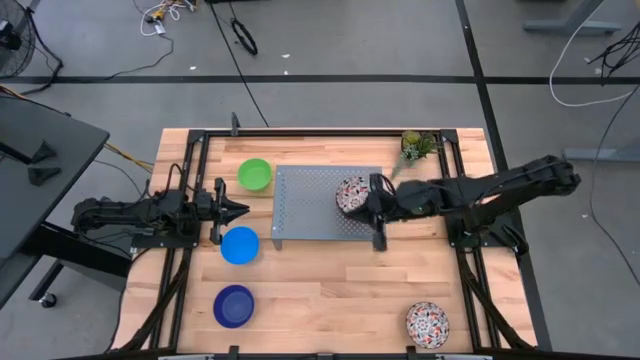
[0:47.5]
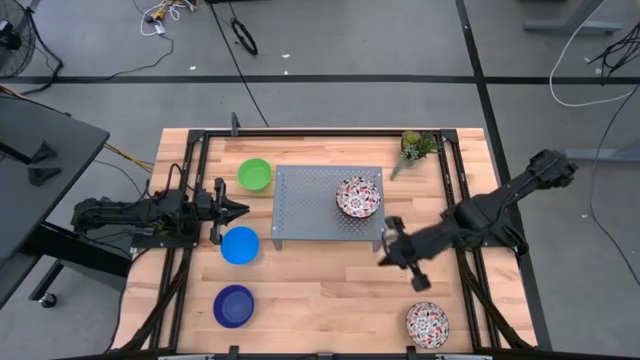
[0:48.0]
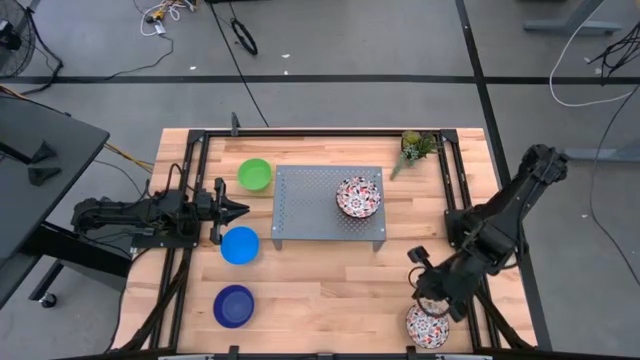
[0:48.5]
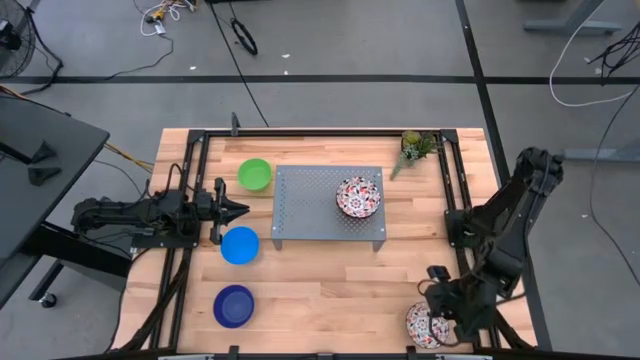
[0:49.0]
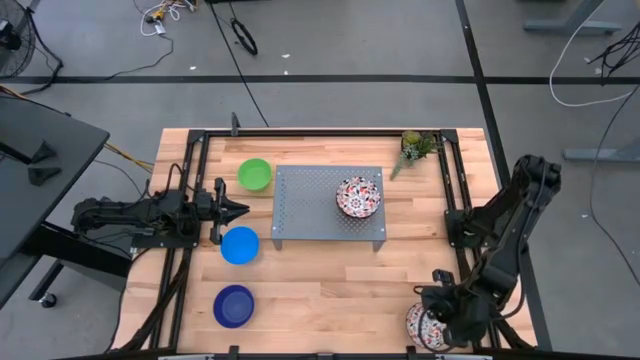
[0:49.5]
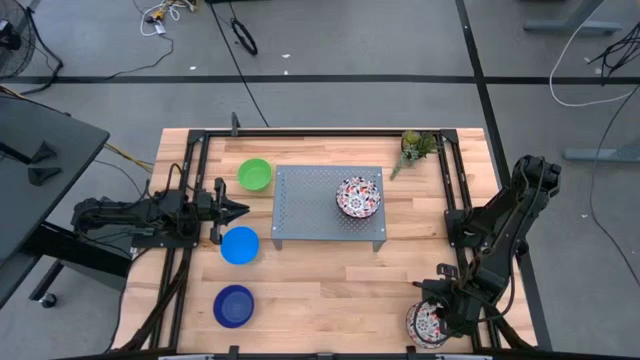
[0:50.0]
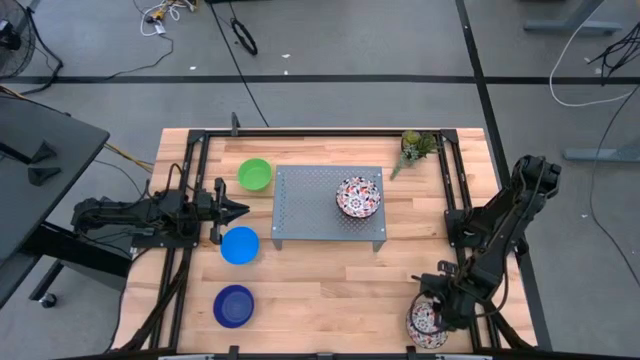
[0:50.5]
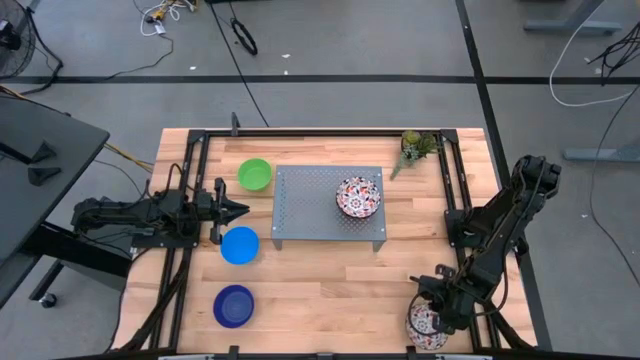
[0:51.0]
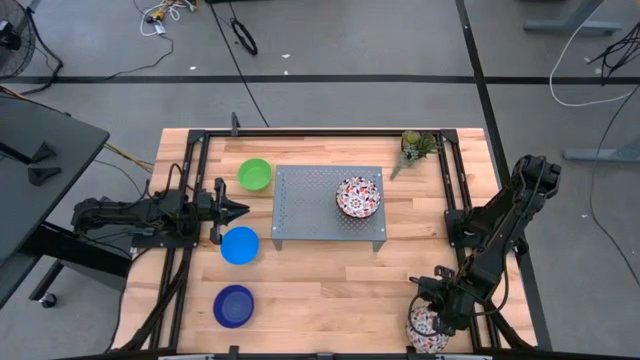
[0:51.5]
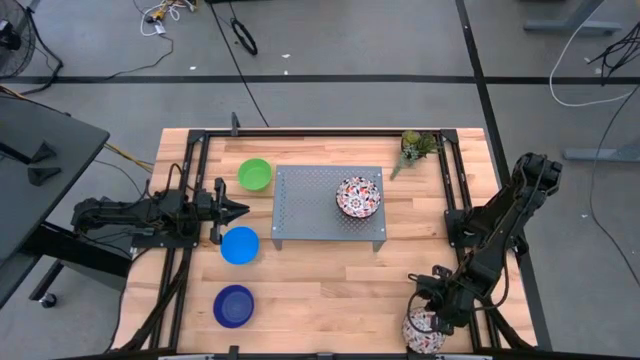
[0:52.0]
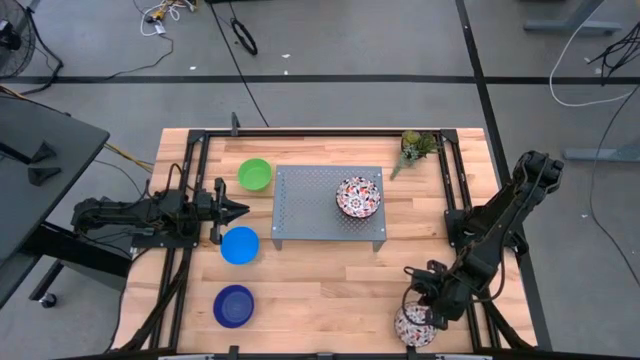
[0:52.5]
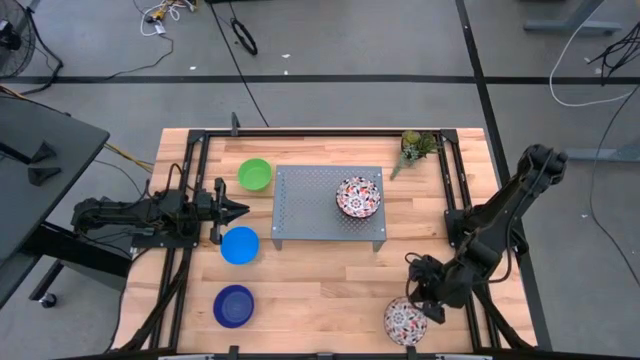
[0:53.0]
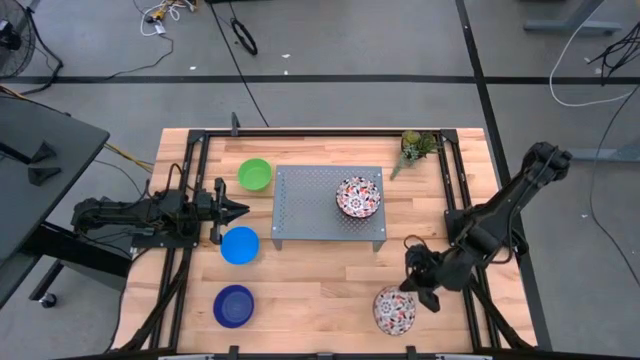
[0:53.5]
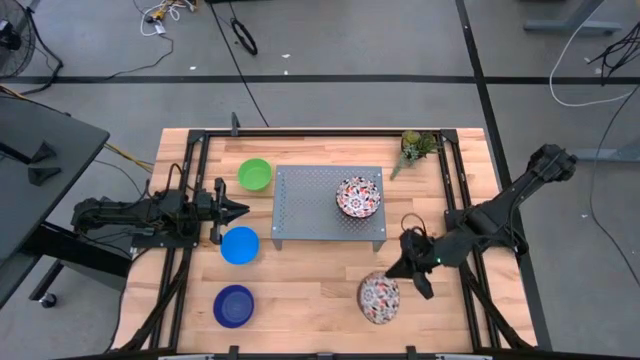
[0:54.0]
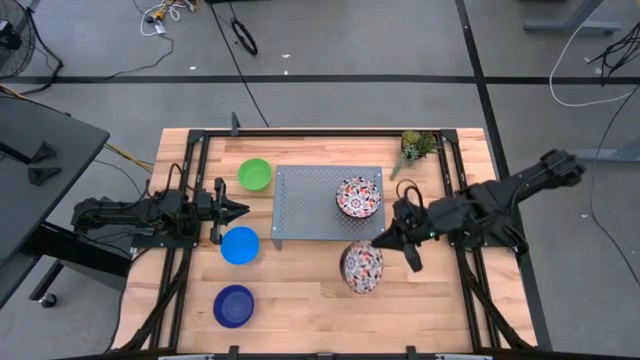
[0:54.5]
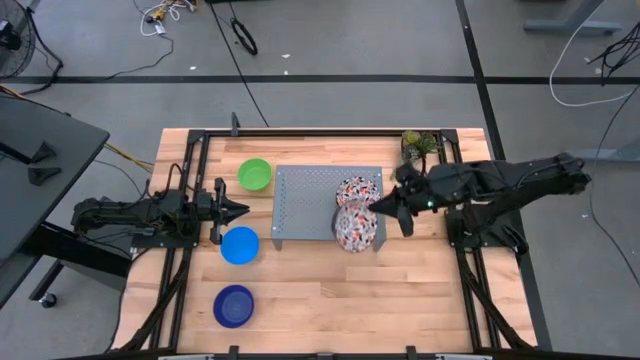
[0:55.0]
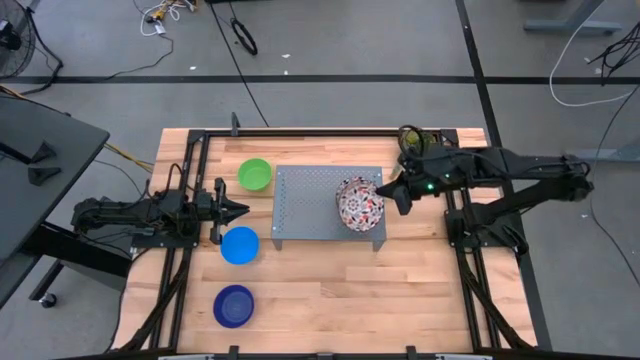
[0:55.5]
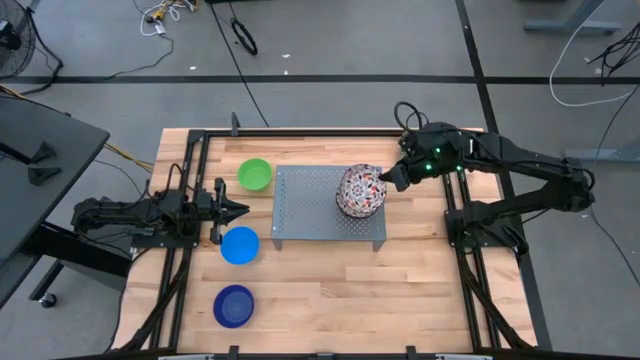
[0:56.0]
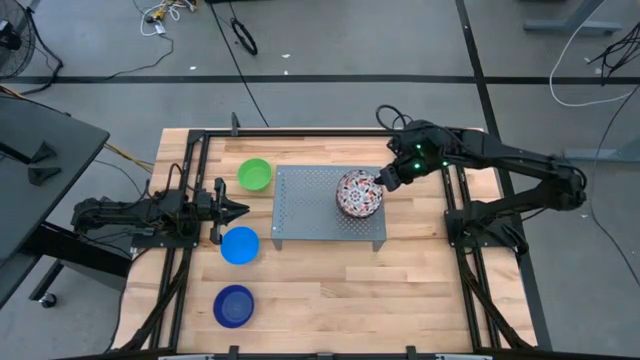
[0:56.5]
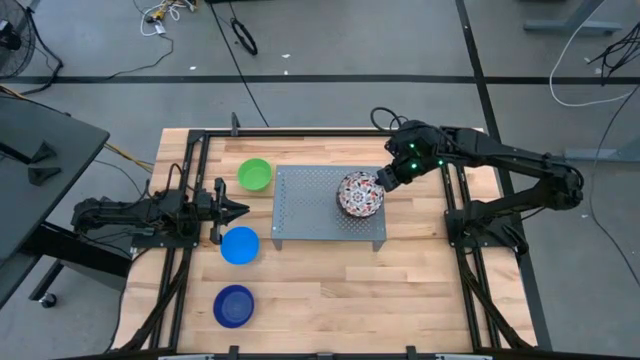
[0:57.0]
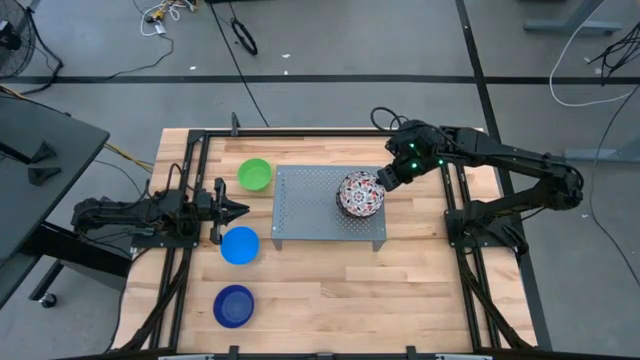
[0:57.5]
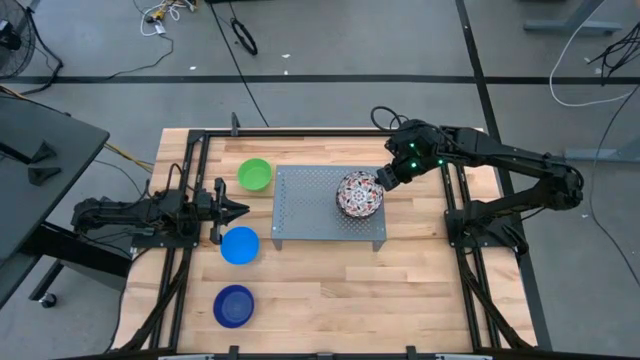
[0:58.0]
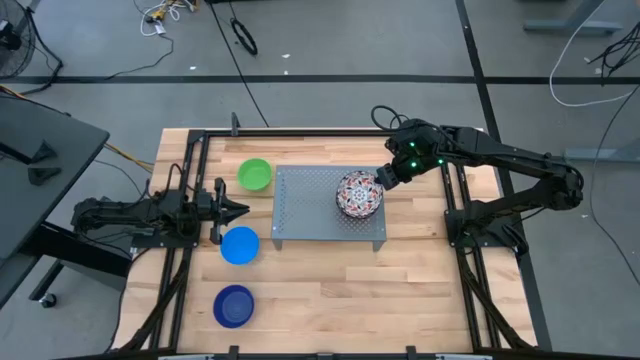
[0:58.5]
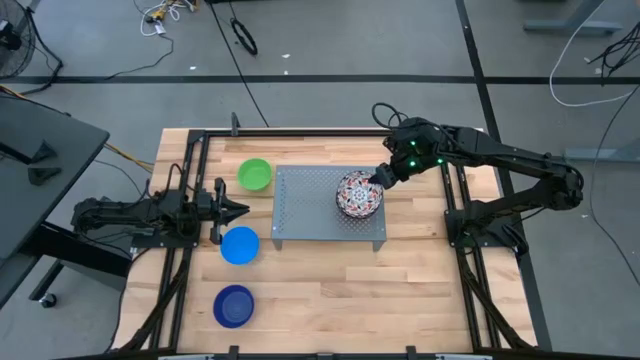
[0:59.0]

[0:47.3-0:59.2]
Task: Pick & Place Mini bowls
Stack the white patterned bowl on top of the other white patterned bowls on the shelf

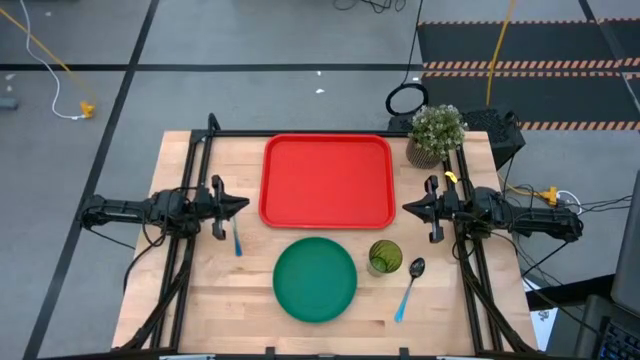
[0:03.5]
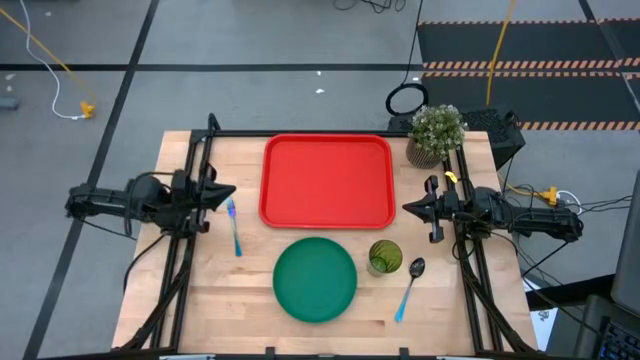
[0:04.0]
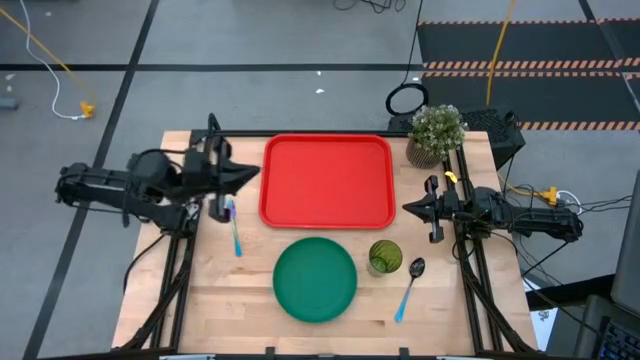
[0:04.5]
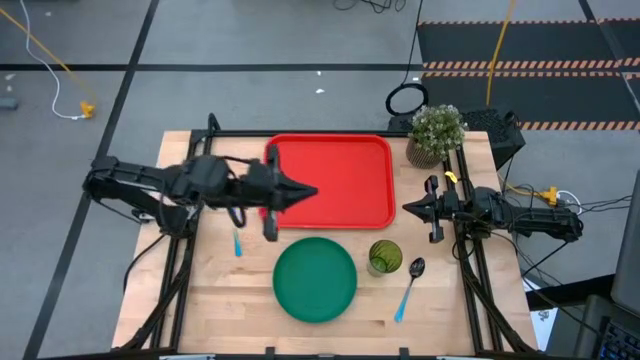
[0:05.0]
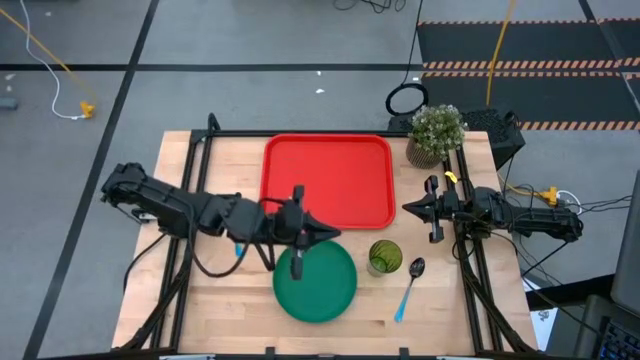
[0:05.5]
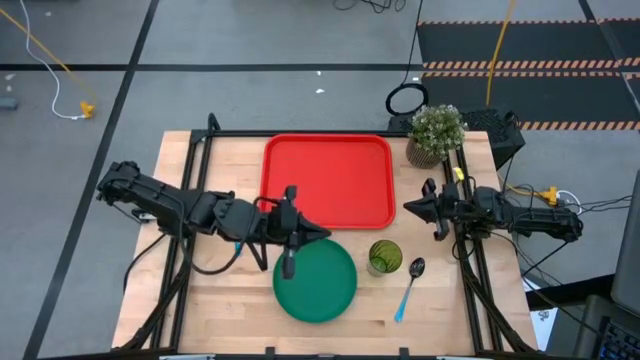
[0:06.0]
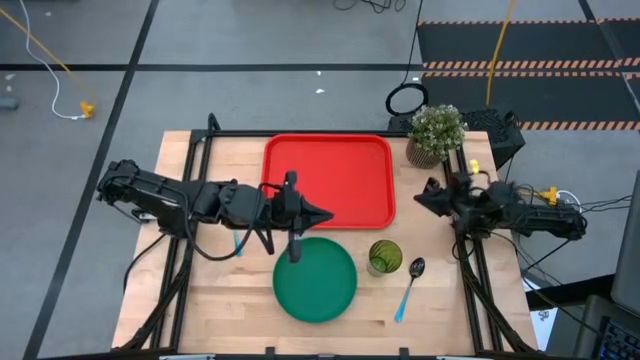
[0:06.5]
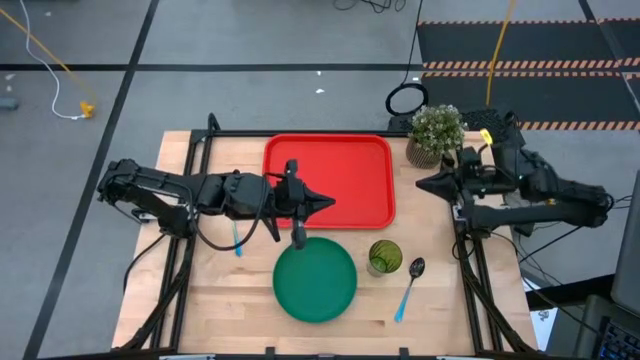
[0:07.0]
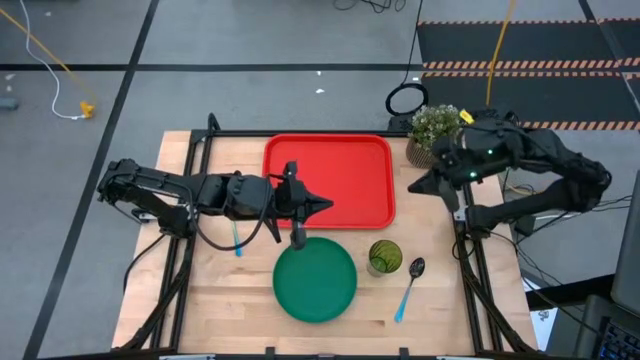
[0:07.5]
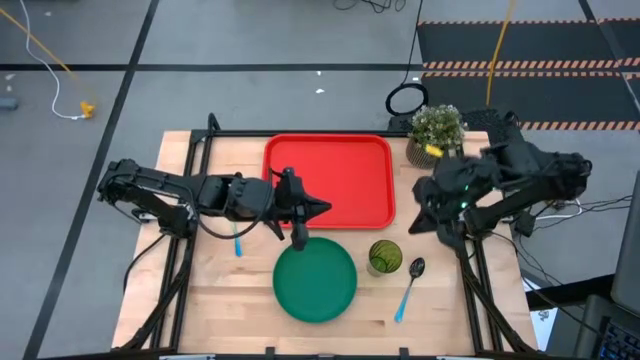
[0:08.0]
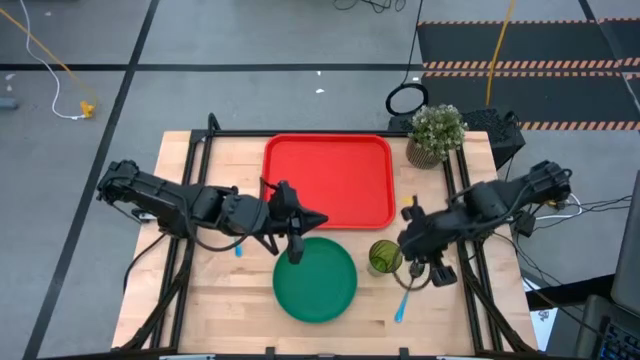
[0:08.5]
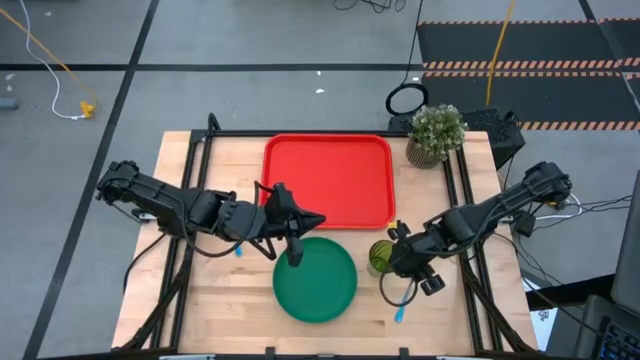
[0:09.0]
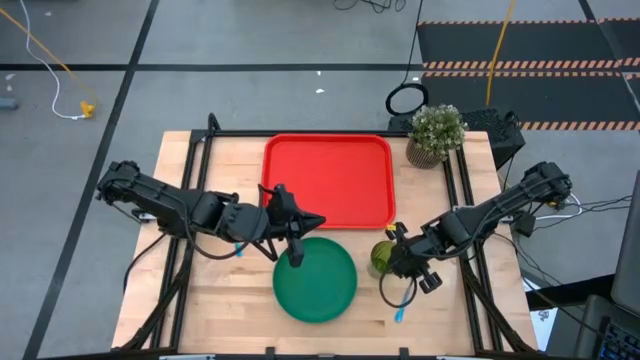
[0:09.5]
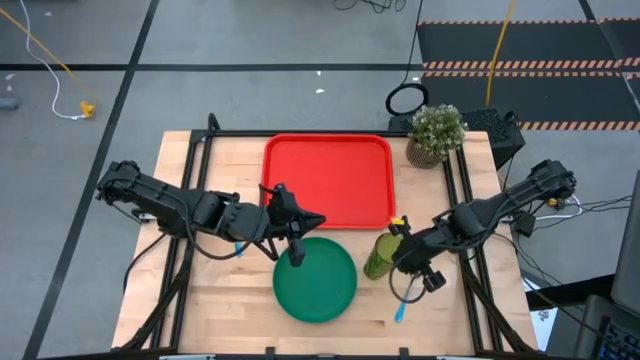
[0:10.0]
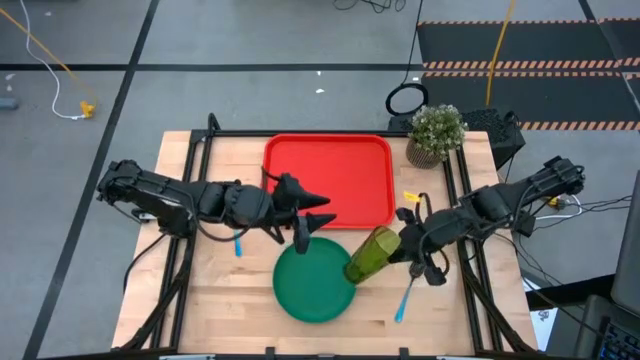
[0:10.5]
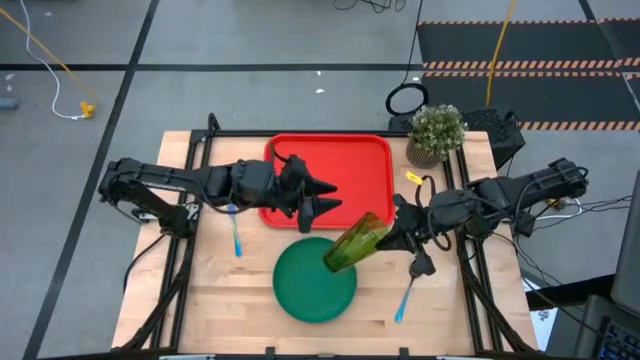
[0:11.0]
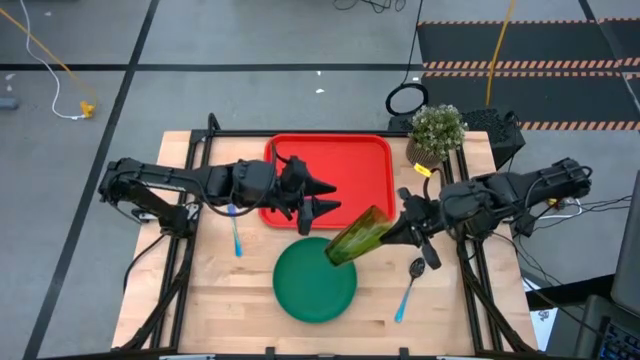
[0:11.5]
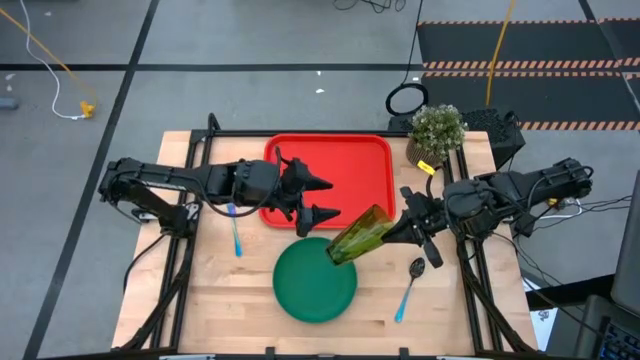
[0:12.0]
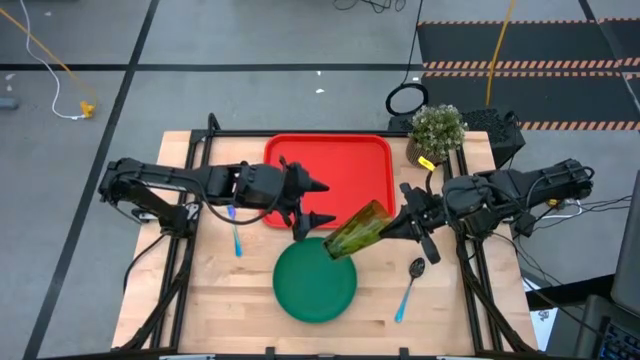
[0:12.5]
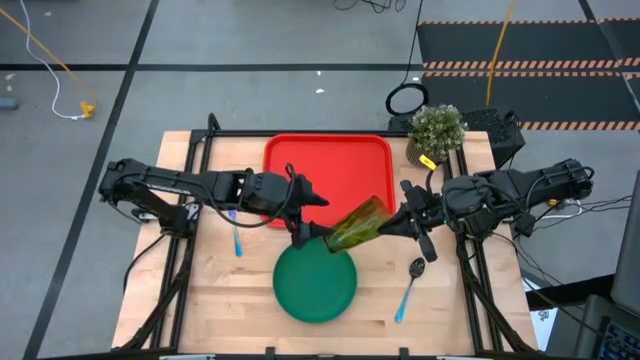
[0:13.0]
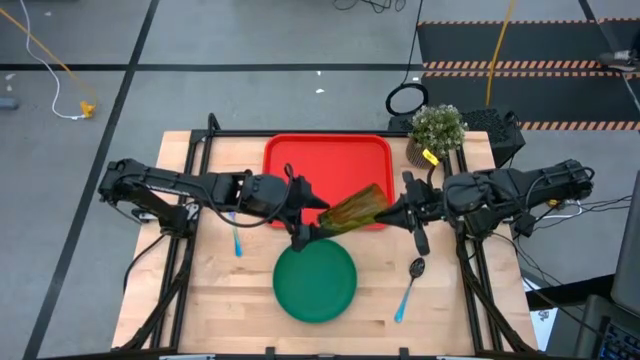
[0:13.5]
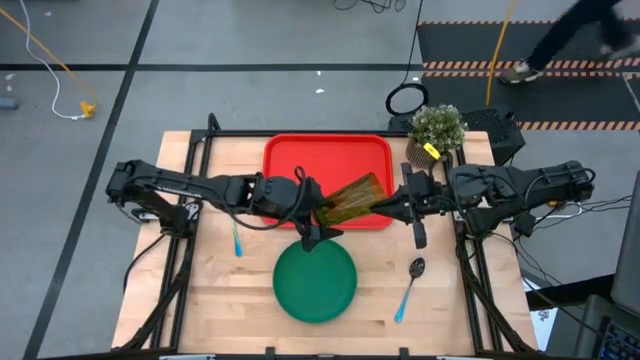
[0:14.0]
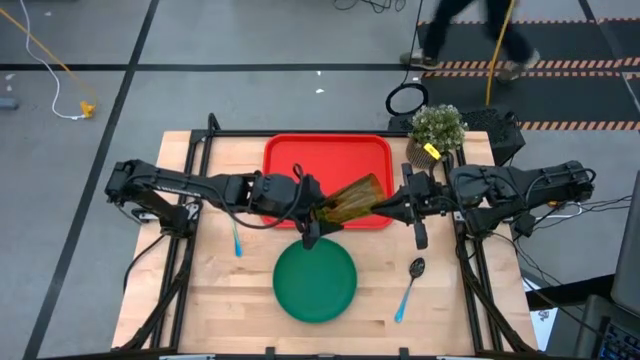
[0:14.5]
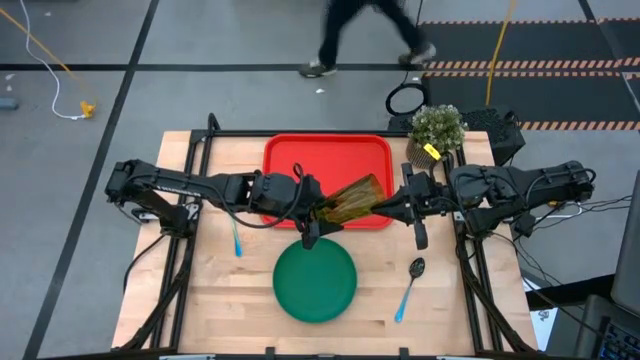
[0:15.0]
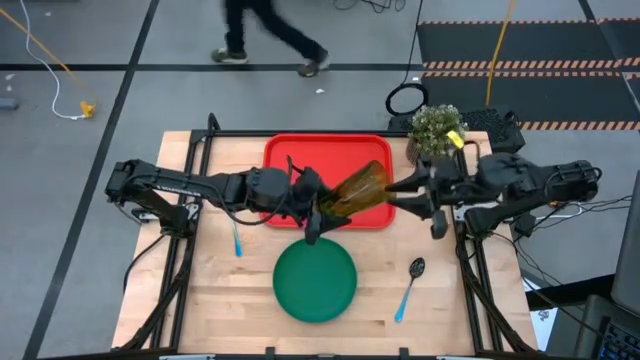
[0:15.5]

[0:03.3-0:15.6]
Task: Pick and place plate/cup/fork/spoon on tray
Put the green glass on the orange serving tray
